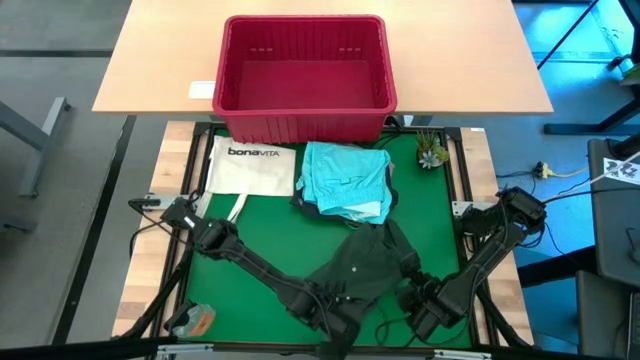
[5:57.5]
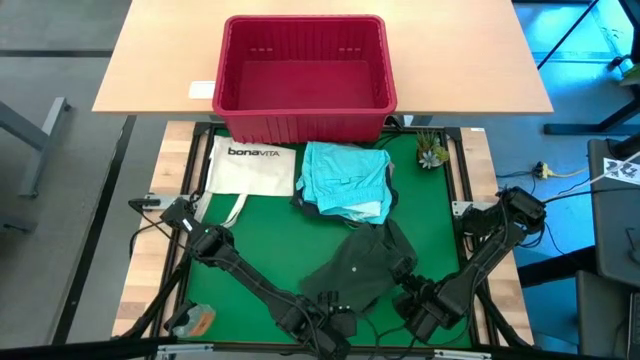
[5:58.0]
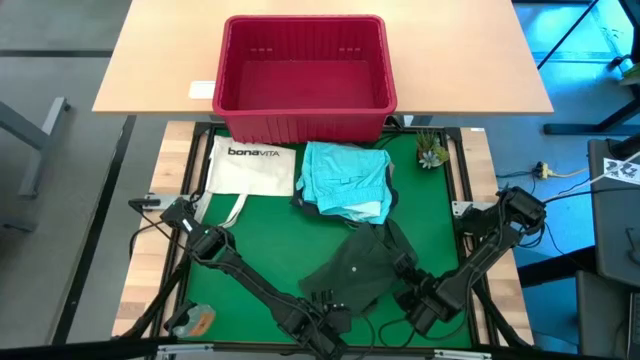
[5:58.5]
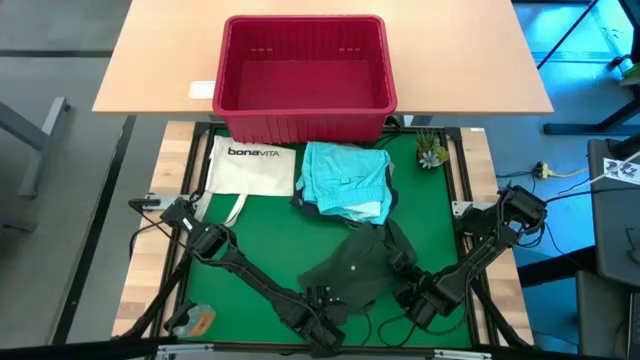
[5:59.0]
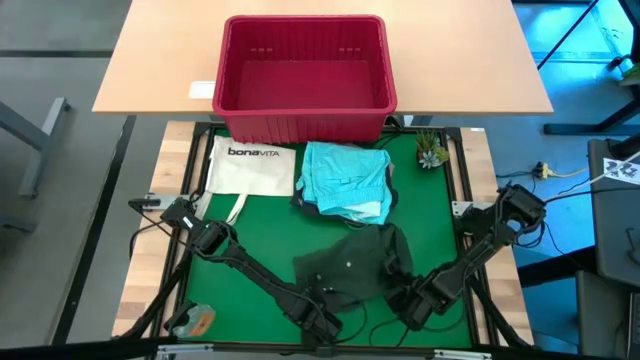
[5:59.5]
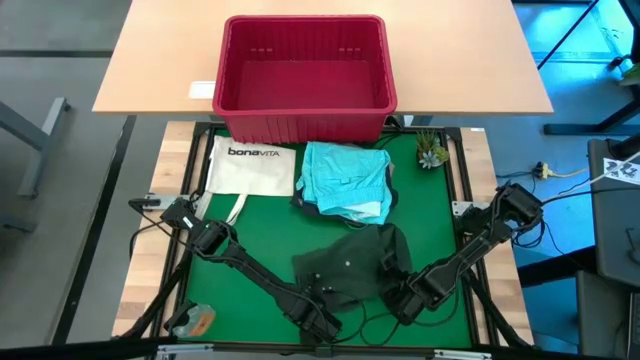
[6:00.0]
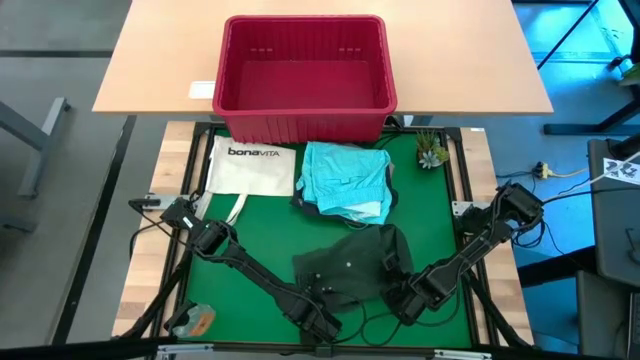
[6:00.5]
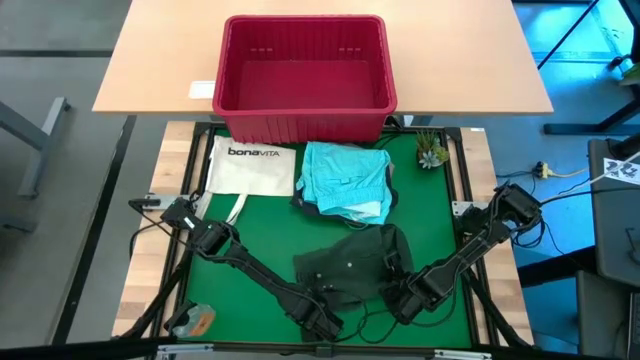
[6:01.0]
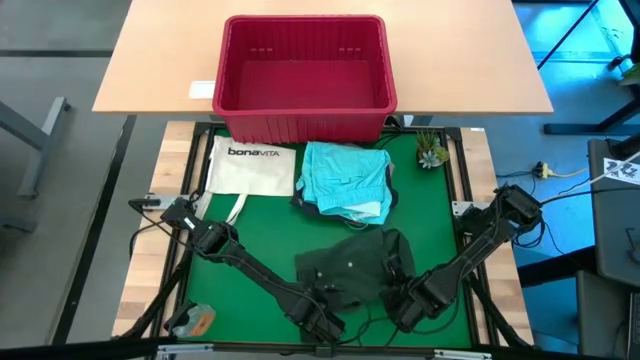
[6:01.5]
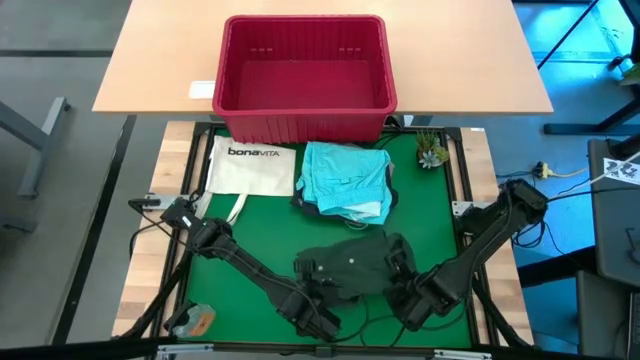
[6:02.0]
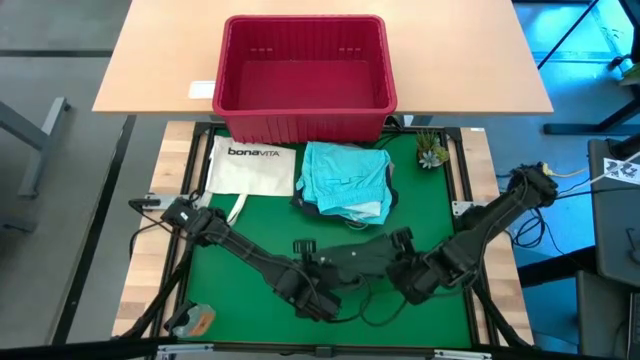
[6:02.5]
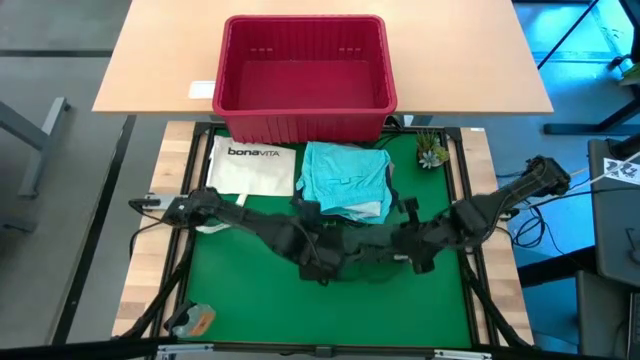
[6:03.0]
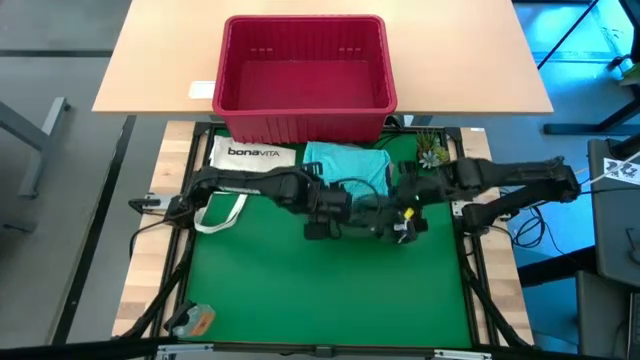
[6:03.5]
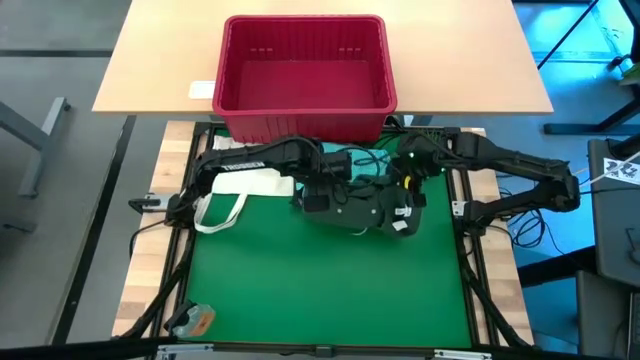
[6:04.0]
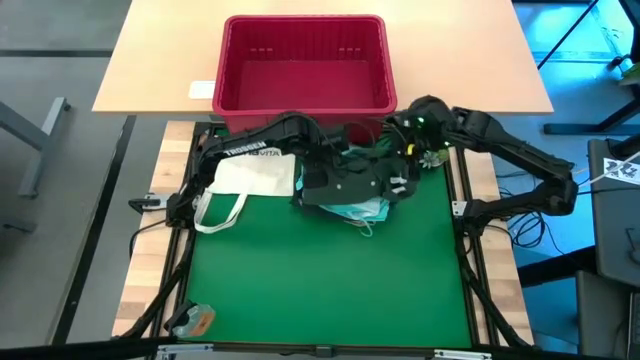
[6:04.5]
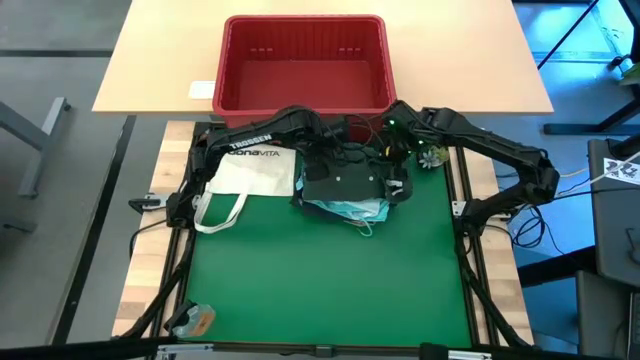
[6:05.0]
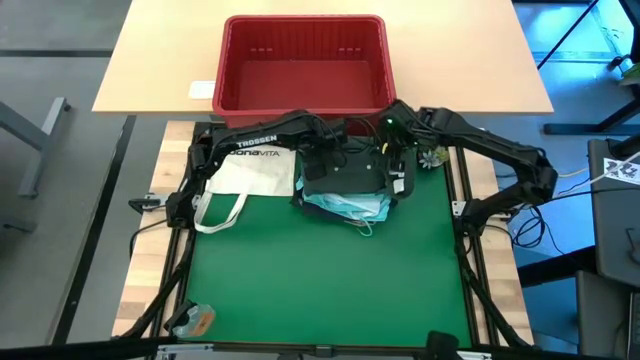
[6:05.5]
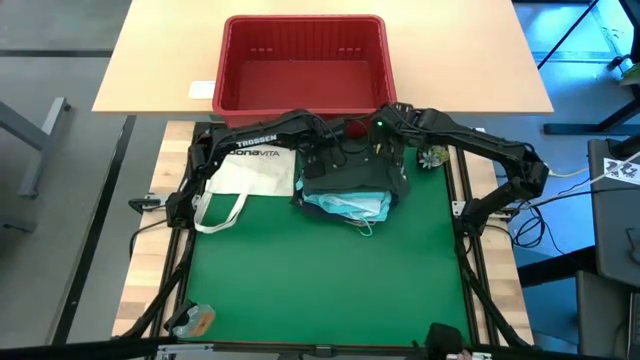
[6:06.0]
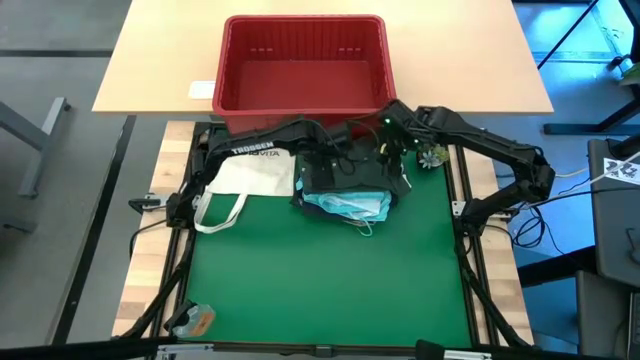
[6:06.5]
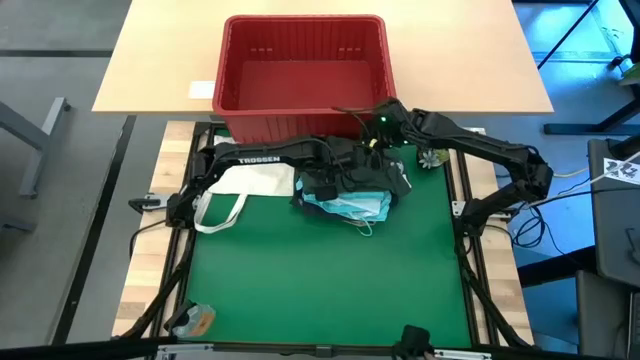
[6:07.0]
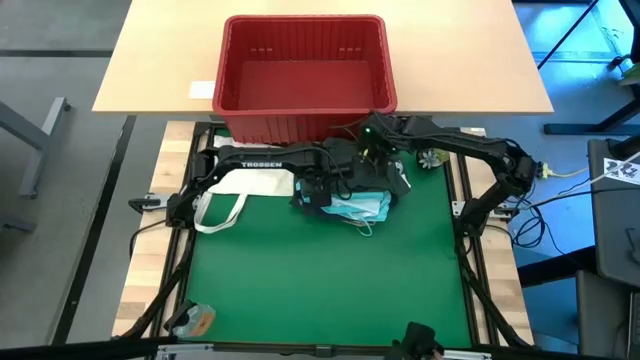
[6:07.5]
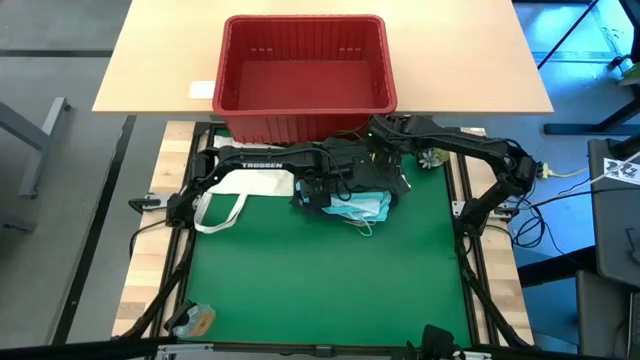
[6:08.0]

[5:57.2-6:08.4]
Task: Fold Laundry from Bin
Stack the folded green polo shirt on top of the folded light blue shorts

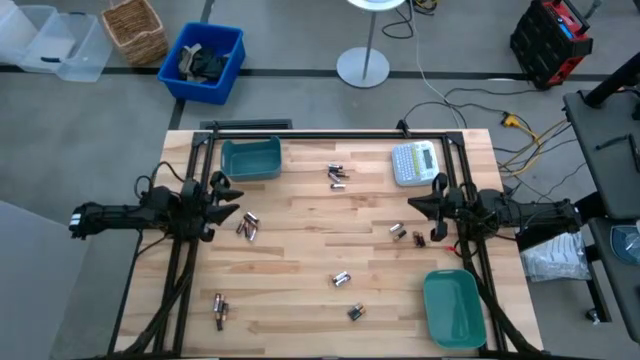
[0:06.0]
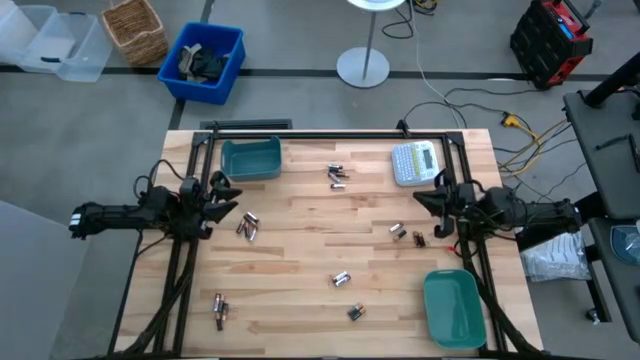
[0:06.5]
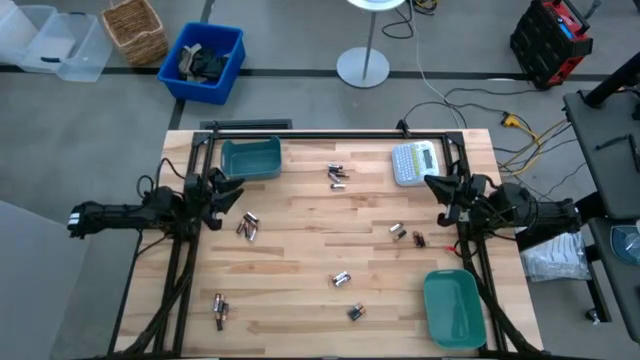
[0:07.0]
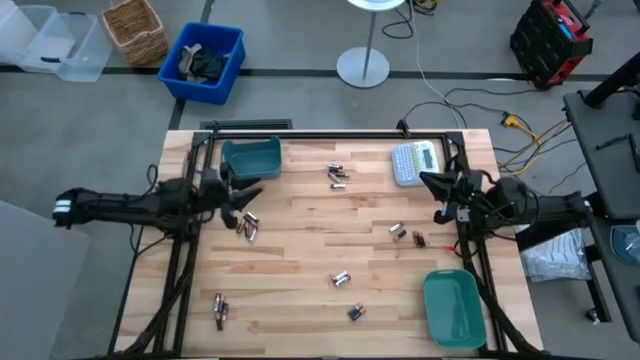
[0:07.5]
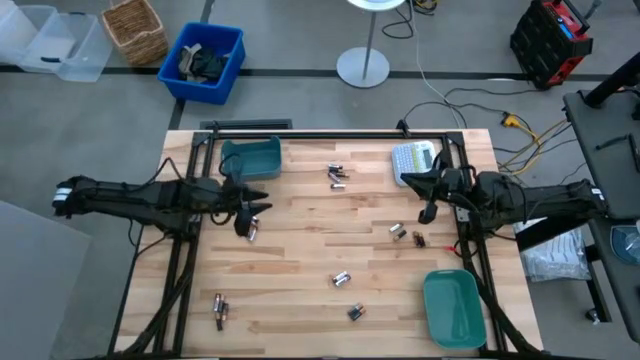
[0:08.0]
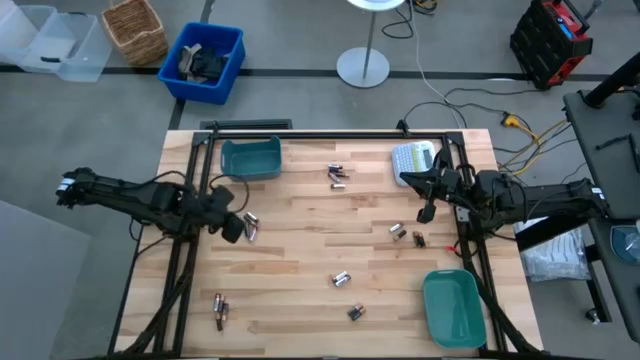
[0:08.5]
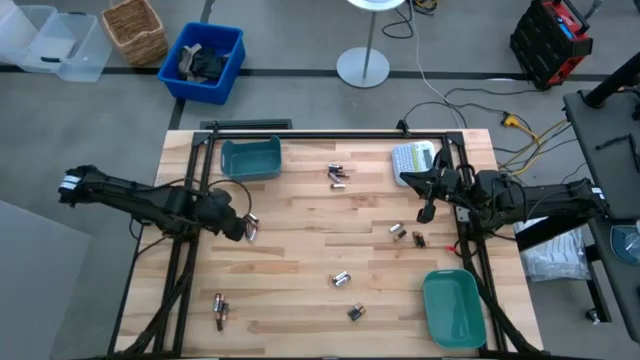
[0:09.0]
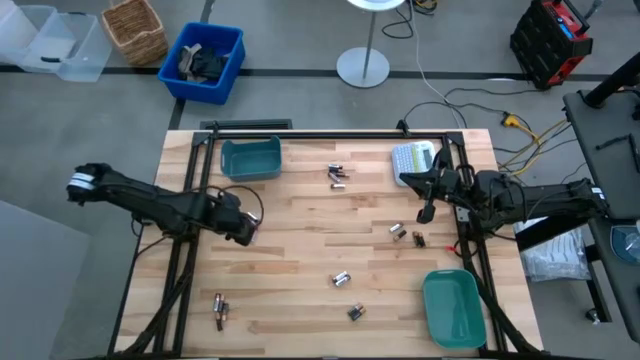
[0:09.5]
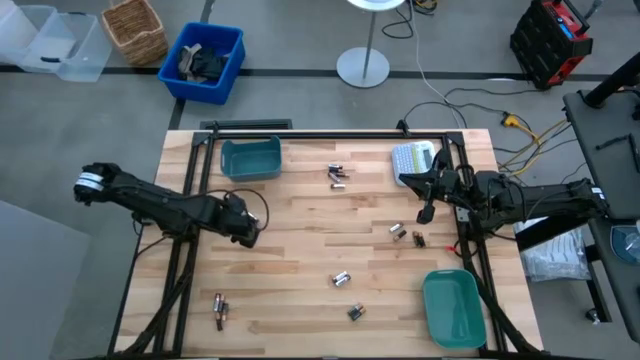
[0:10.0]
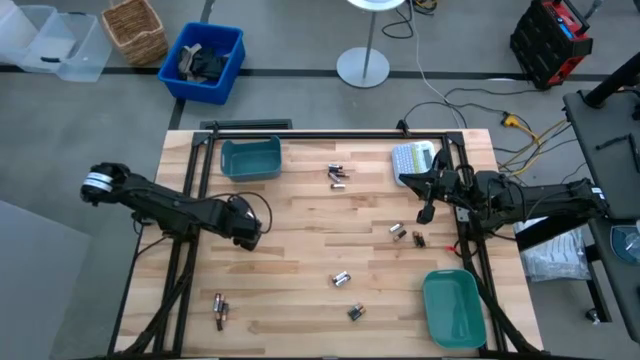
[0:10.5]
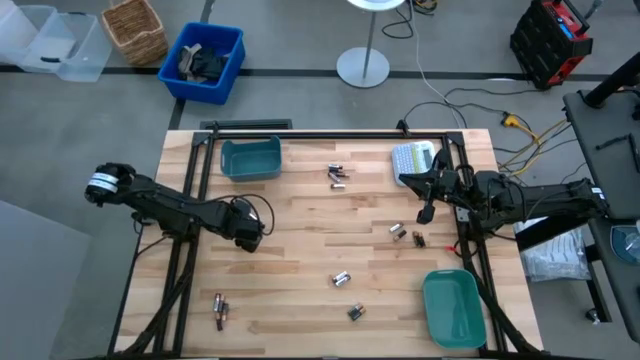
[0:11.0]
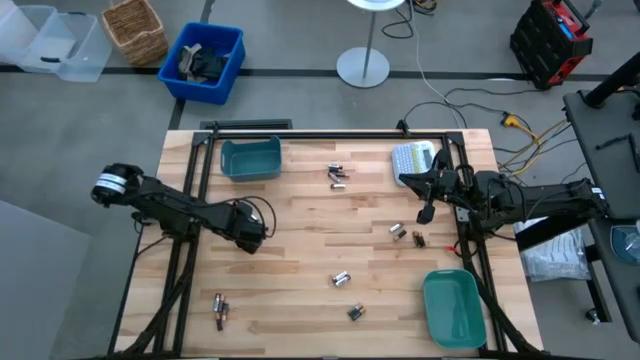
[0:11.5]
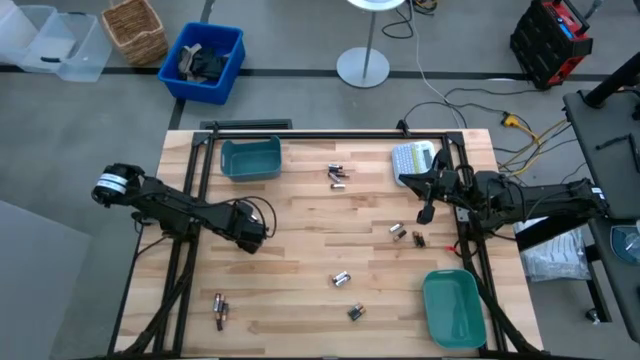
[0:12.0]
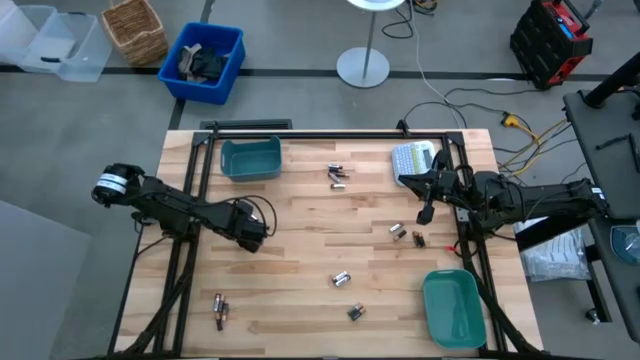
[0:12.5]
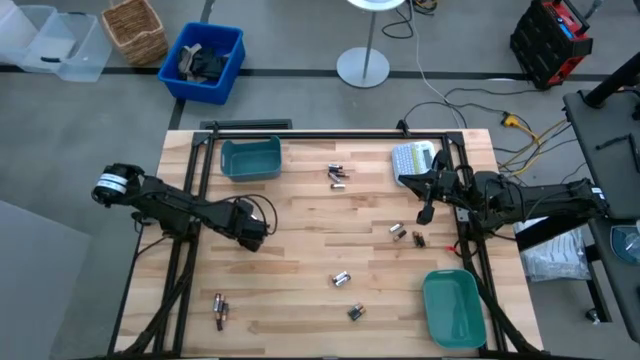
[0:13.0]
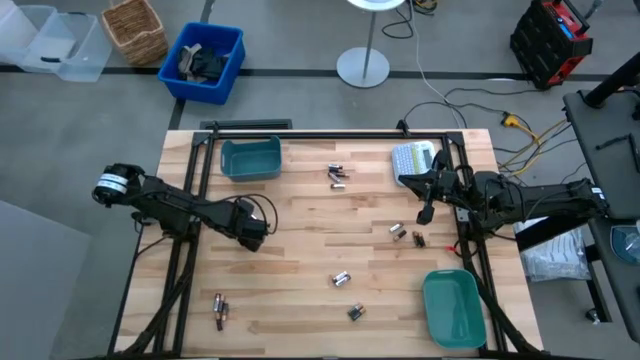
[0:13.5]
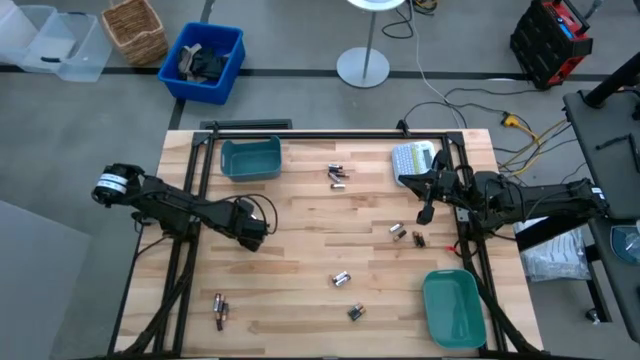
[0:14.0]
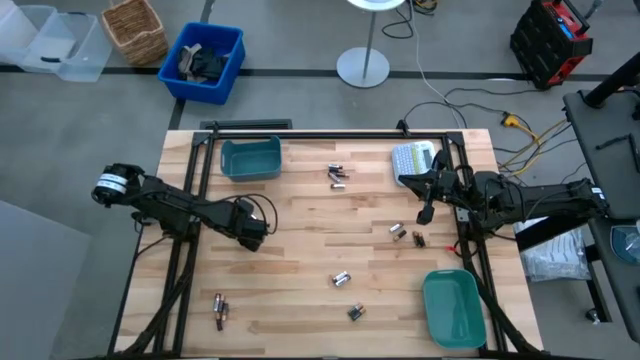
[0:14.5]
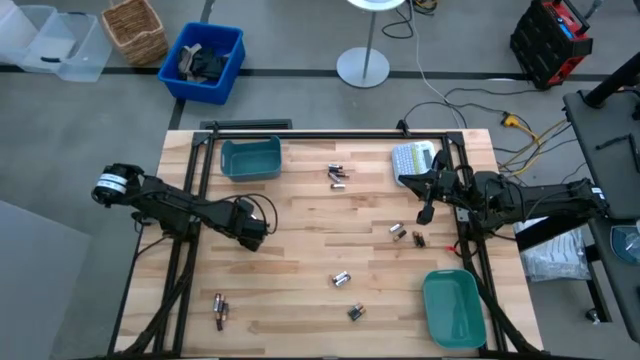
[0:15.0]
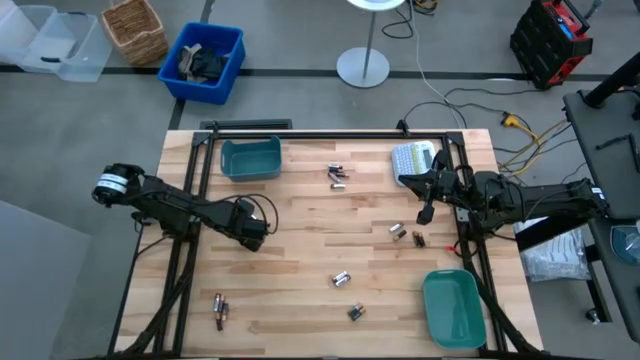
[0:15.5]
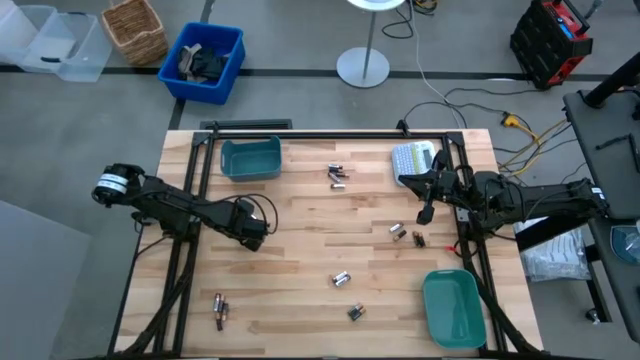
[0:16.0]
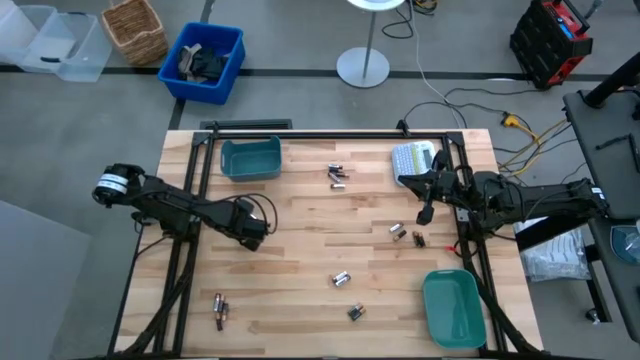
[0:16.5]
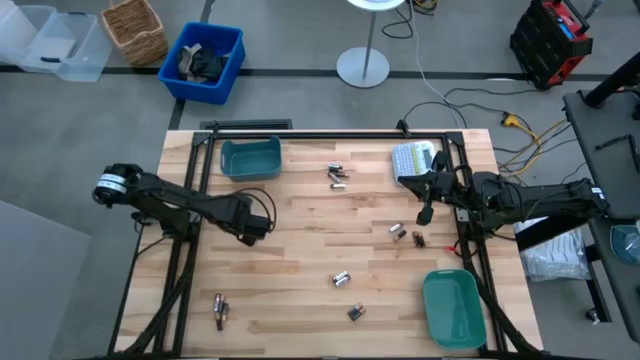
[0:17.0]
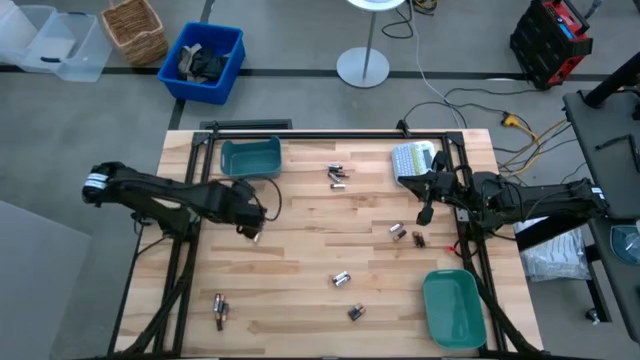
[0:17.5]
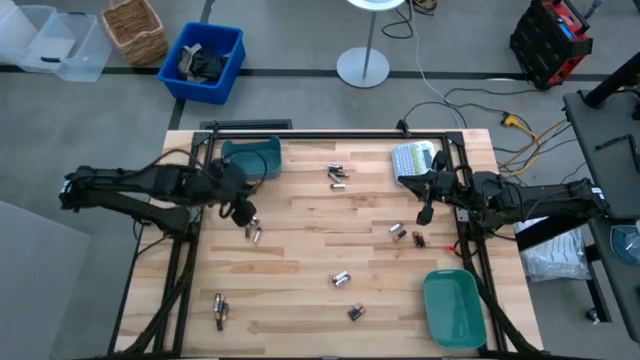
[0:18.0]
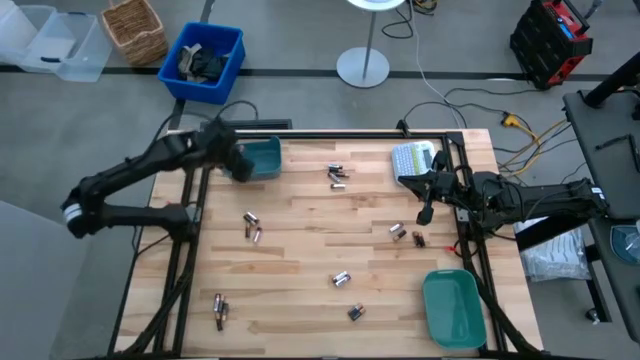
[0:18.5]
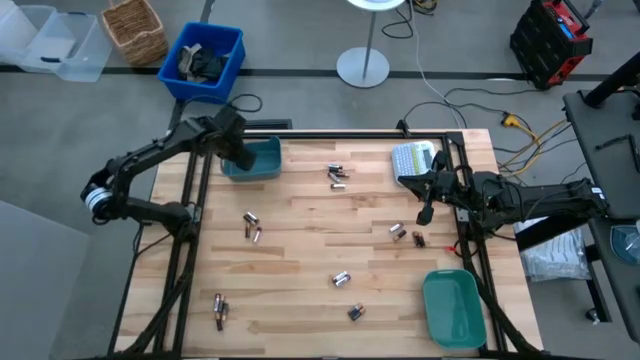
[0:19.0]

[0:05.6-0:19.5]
Task: Sort batteries
Put the black battery into the blue bin
